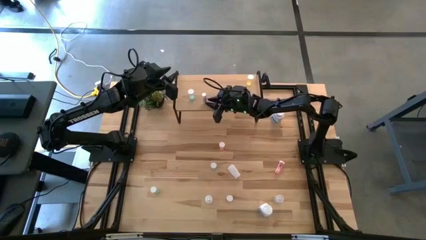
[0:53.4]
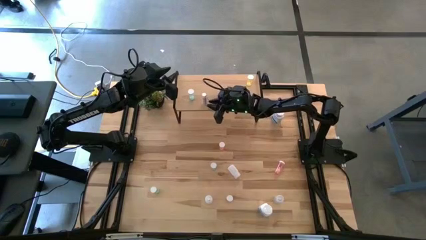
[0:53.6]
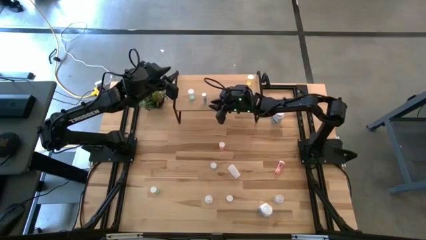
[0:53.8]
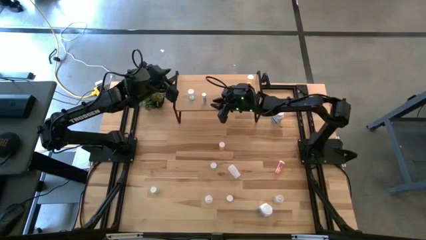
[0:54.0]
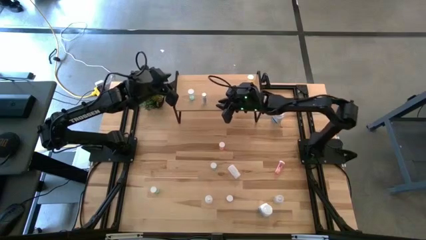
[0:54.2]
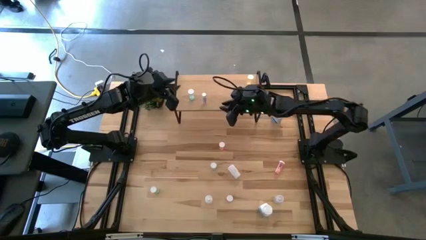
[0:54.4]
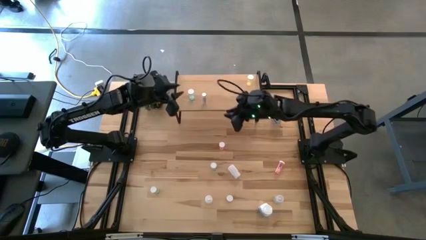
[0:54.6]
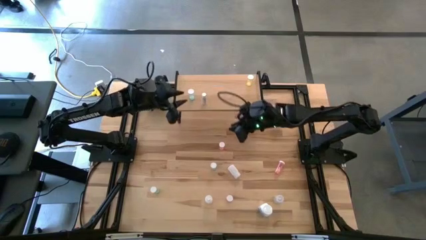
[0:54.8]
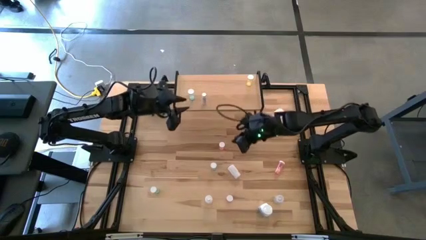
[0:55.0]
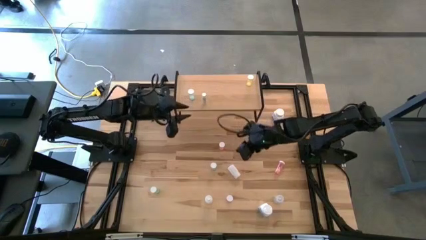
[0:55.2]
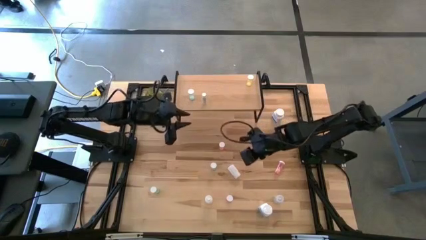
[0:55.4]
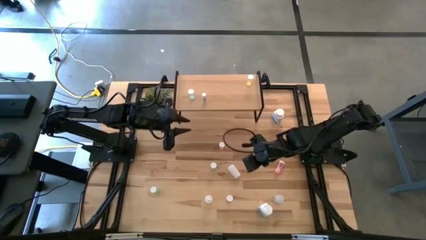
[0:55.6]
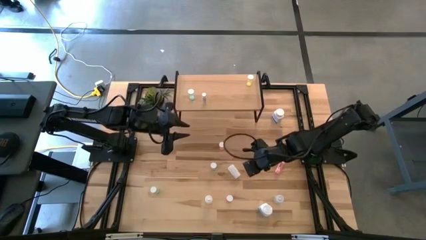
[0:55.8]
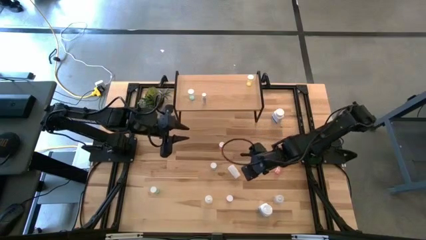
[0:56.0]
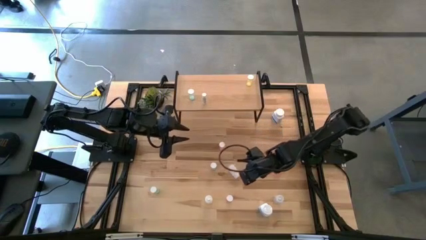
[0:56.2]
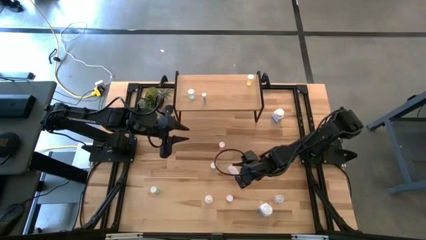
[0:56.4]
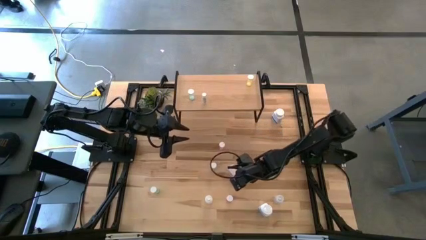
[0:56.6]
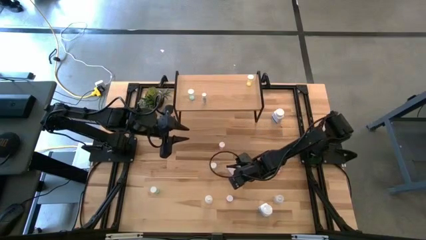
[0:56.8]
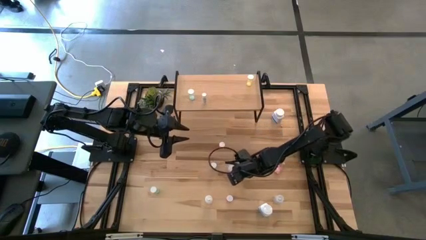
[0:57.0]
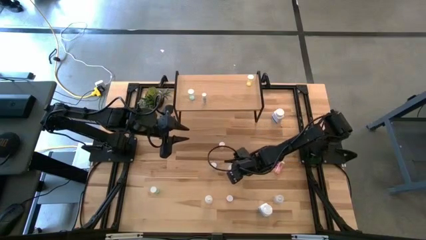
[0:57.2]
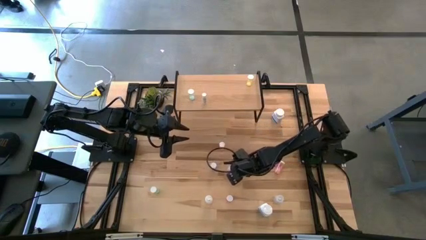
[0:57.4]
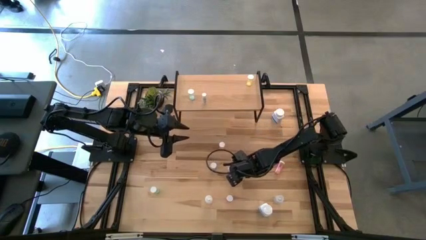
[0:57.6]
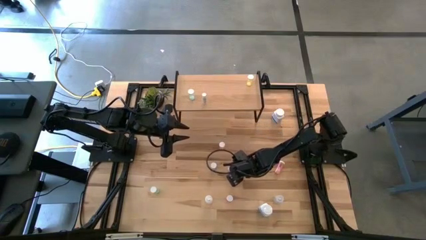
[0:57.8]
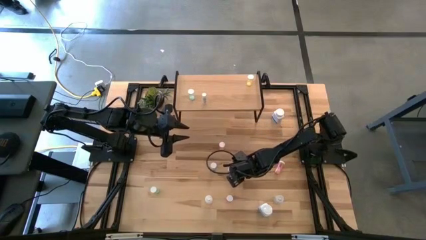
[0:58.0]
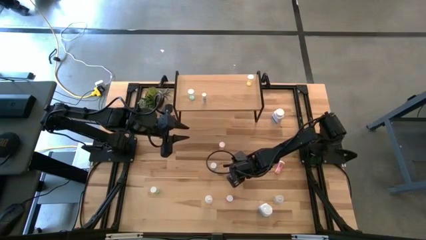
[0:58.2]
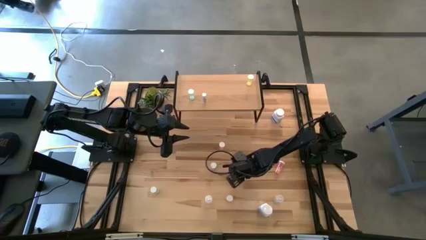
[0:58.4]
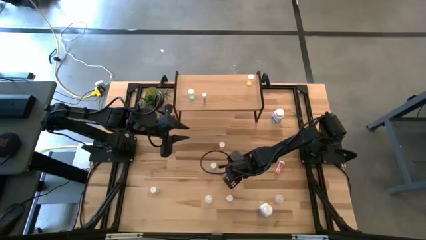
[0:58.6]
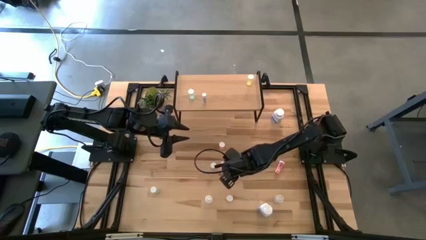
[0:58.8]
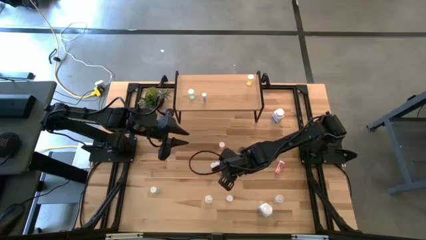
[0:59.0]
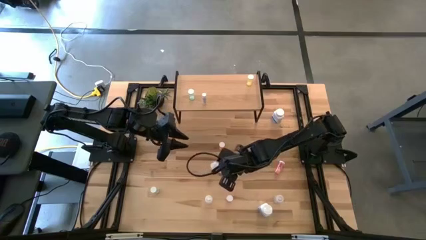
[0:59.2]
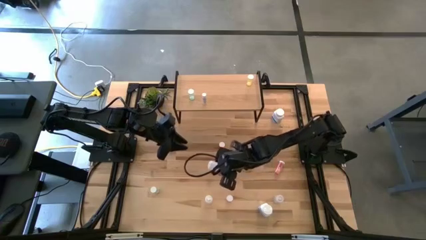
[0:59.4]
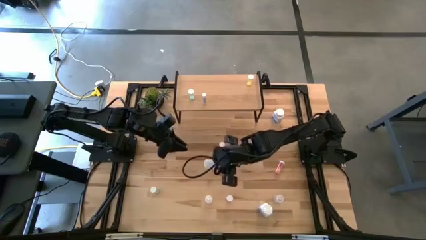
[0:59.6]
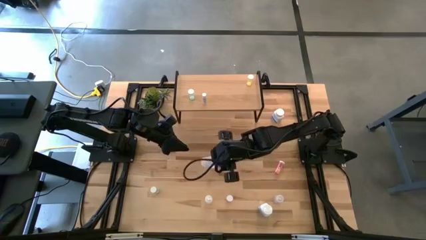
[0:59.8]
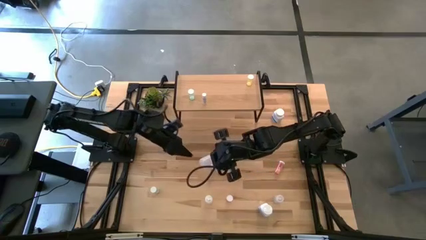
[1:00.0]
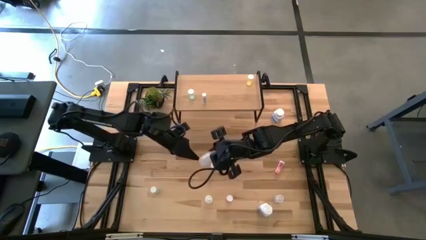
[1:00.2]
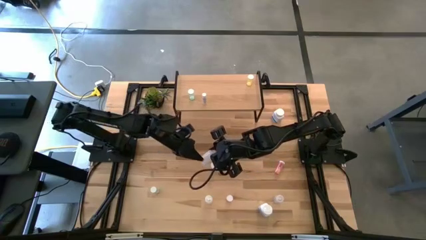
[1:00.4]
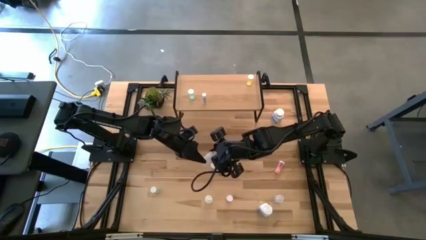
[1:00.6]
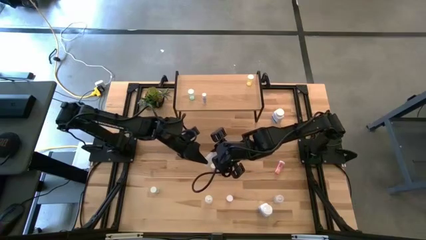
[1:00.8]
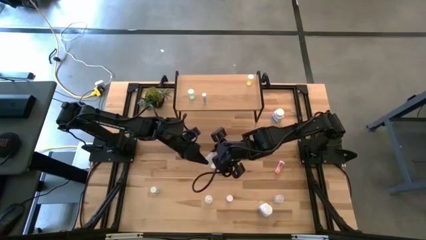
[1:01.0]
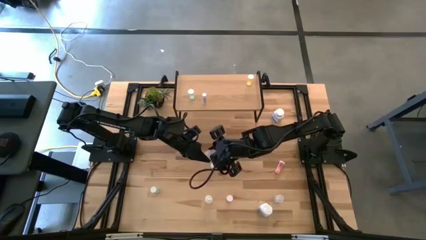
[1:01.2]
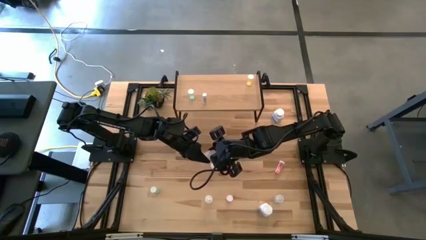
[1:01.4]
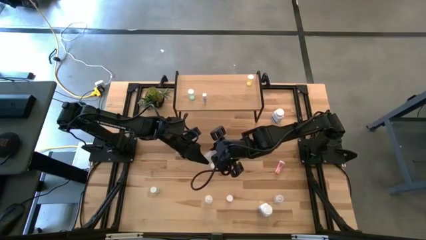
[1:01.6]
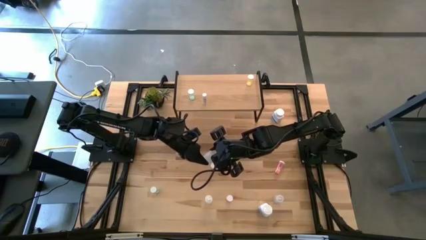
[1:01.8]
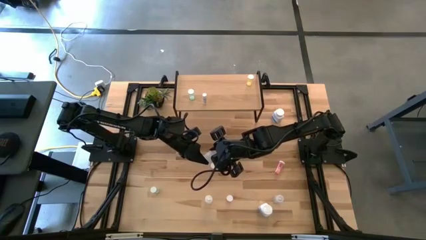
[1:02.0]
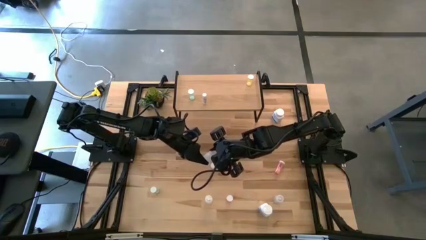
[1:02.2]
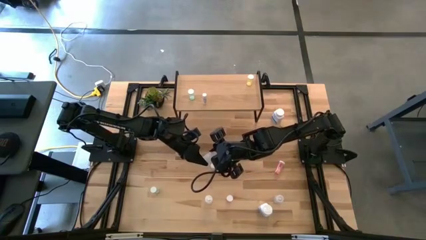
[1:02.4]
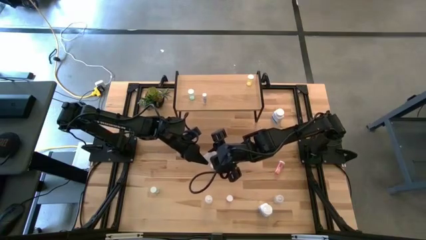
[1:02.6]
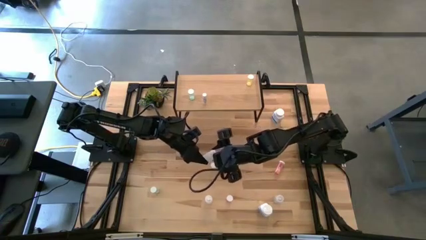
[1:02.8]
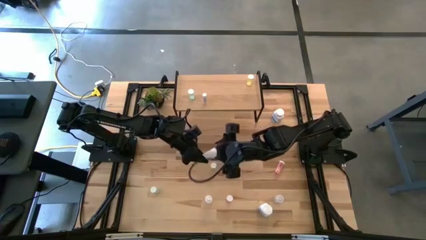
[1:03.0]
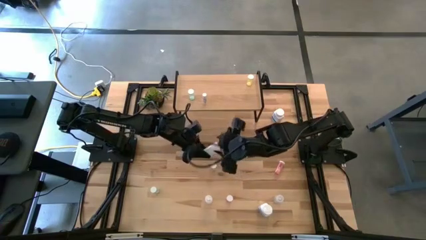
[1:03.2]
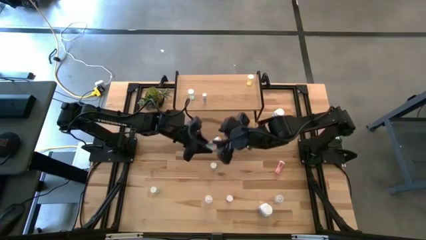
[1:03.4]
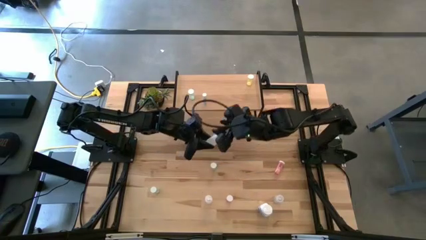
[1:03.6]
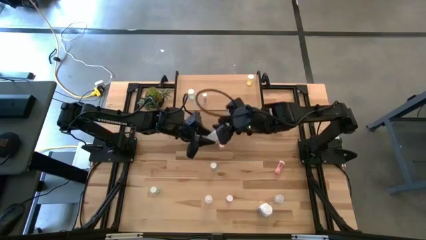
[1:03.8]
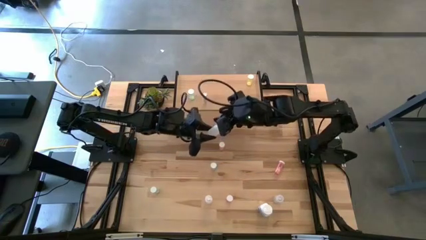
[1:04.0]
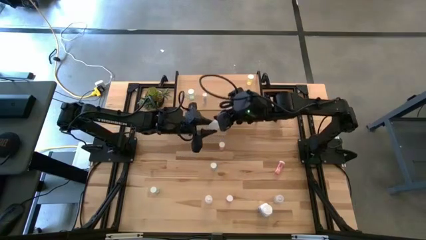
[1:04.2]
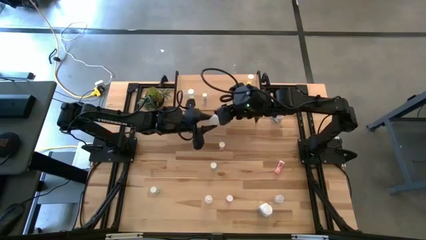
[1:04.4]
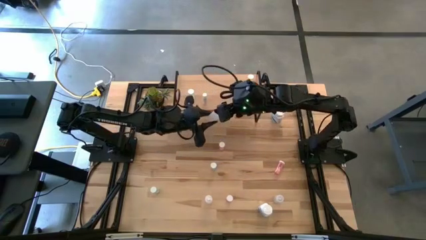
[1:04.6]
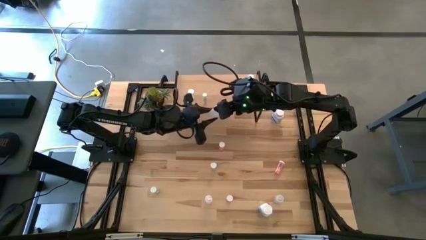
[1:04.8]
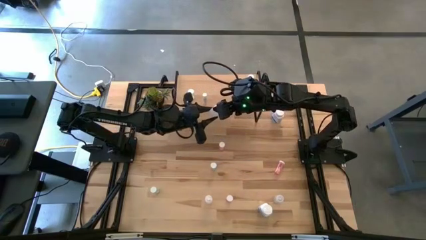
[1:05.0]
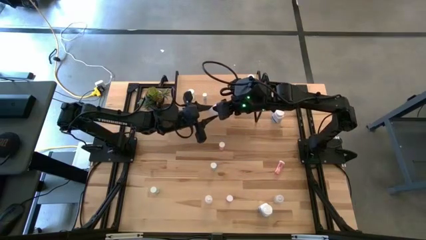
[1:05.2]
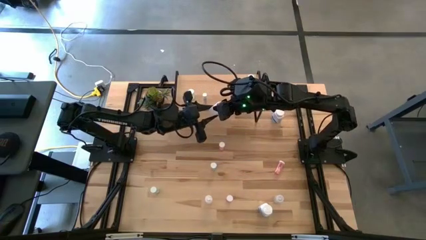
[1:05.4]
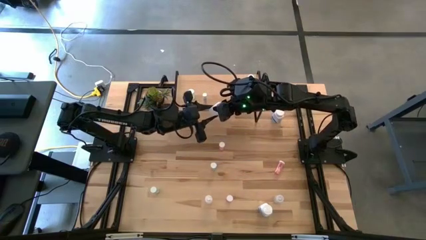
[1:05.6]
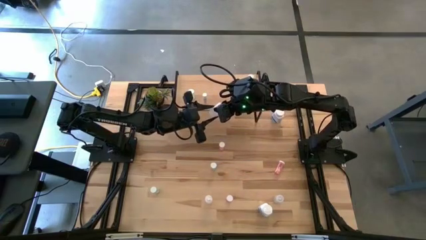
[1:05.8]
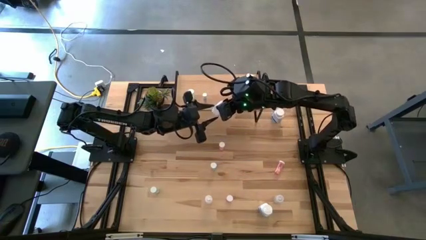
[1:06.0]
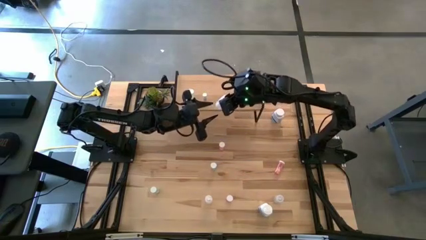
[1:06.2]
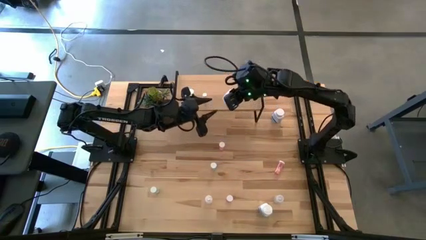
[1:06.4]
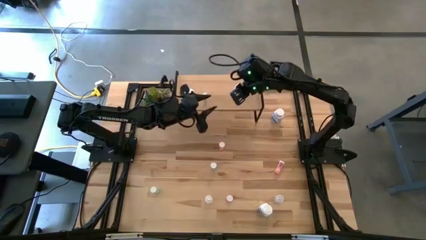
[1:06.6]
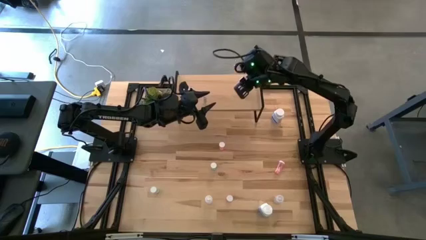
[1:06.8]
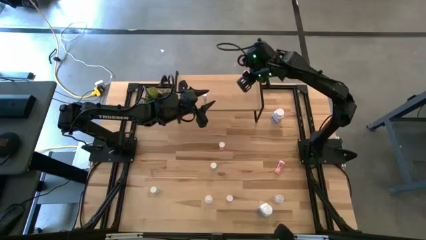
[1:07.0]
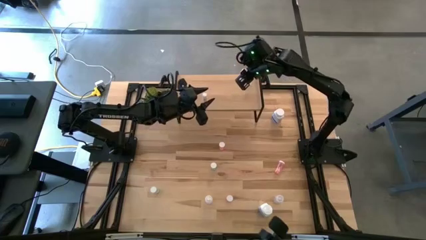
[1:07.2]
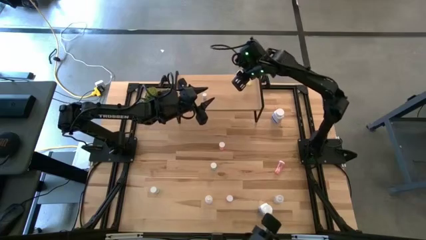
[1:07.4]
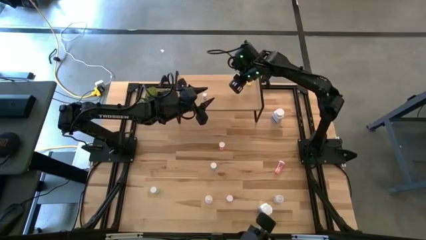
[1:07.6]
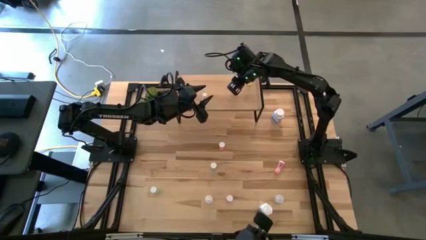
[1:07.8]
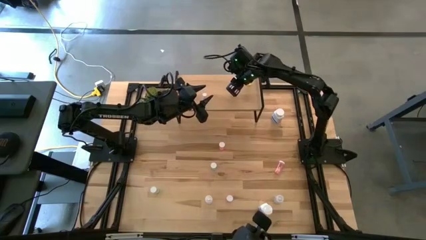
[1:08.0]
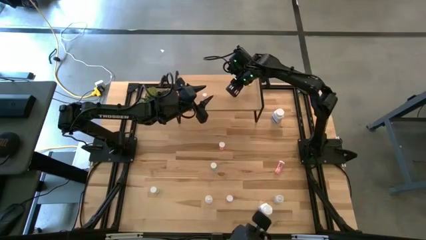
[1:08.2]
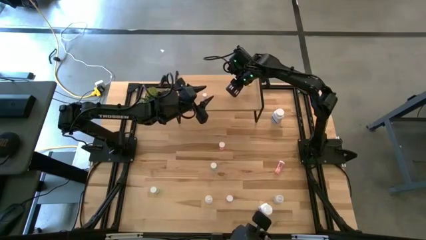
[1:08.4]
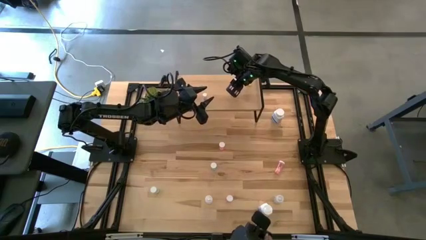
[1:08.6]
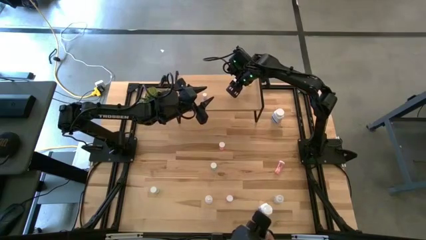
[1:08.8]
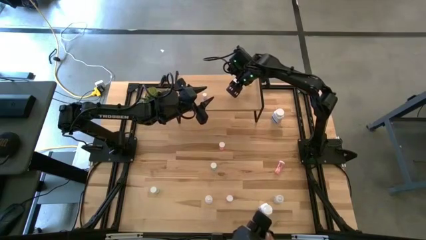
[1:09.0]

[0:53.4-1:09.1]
Task: Pick and place medicine bottles onto shelf by color
Put the top transparent pill bottle on the shelf
